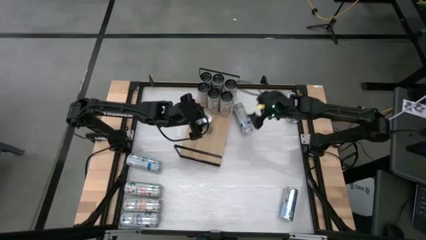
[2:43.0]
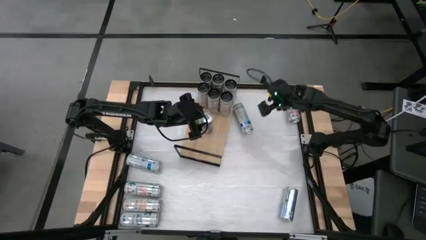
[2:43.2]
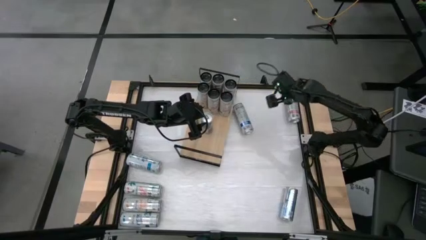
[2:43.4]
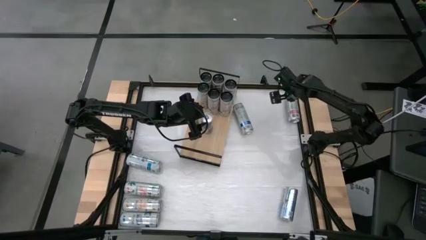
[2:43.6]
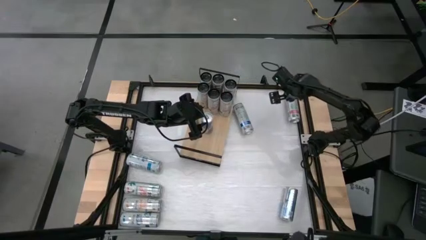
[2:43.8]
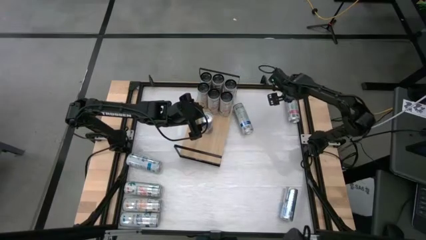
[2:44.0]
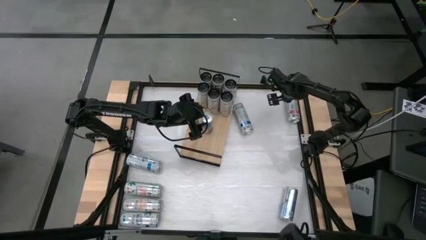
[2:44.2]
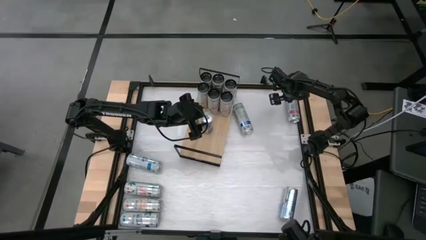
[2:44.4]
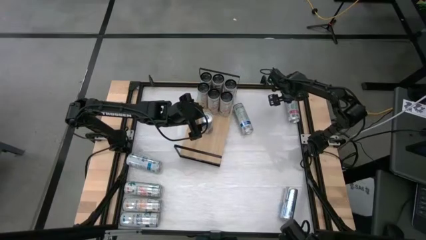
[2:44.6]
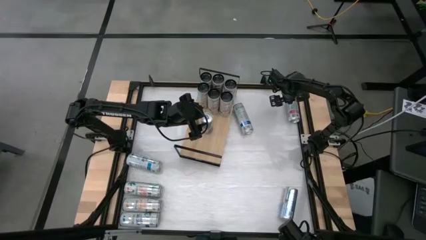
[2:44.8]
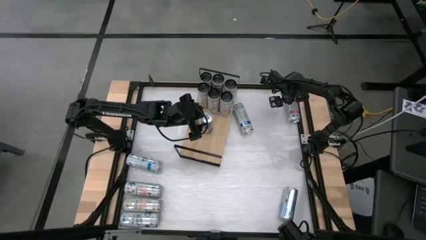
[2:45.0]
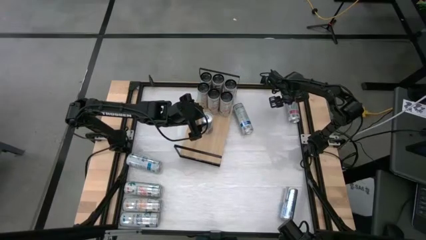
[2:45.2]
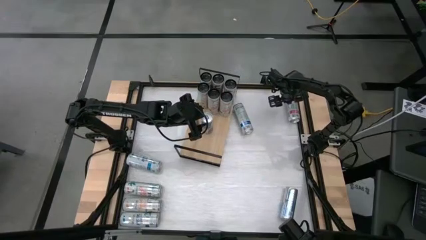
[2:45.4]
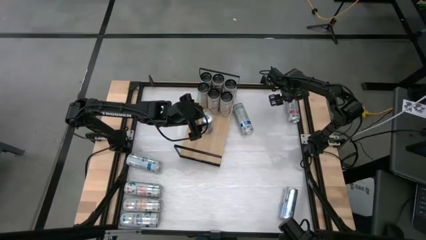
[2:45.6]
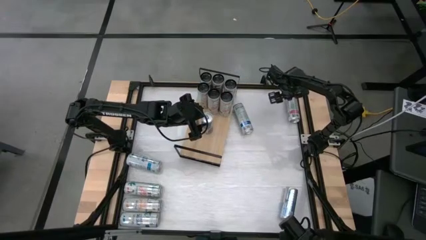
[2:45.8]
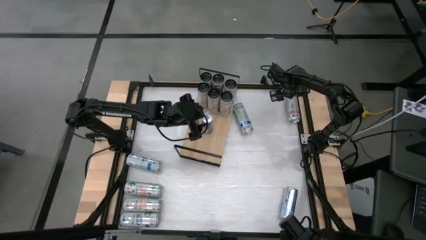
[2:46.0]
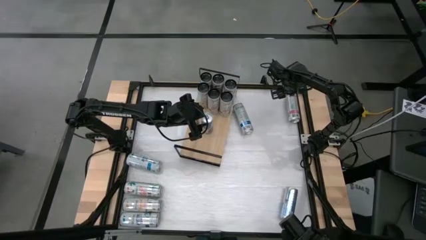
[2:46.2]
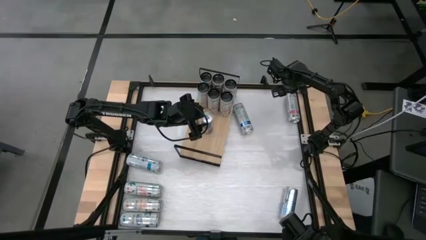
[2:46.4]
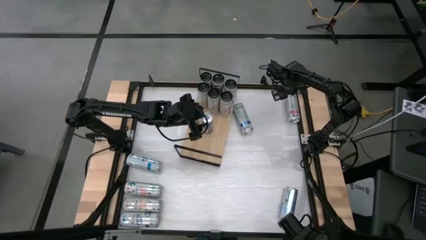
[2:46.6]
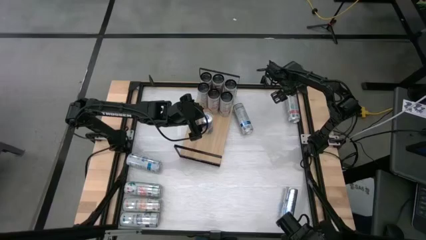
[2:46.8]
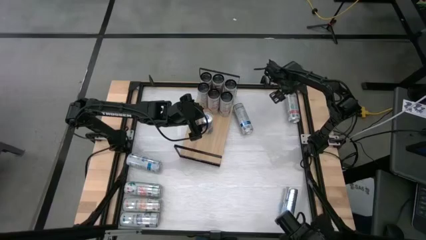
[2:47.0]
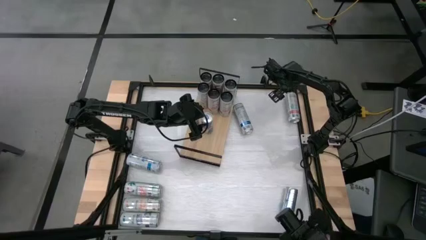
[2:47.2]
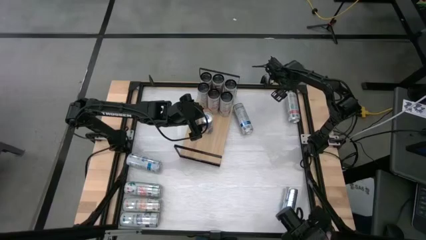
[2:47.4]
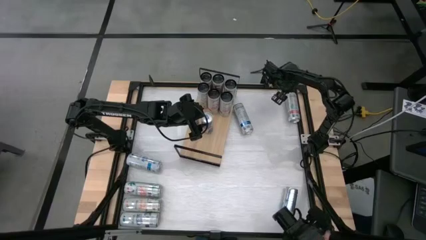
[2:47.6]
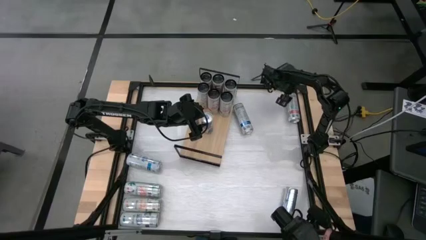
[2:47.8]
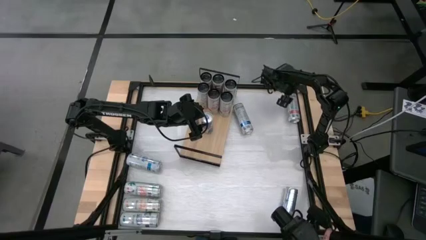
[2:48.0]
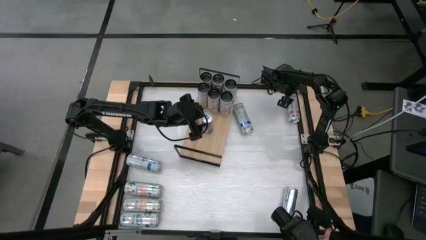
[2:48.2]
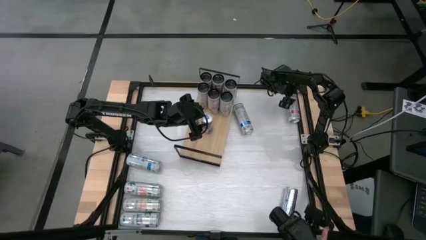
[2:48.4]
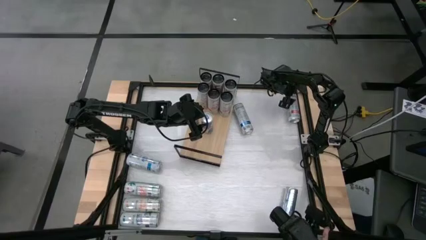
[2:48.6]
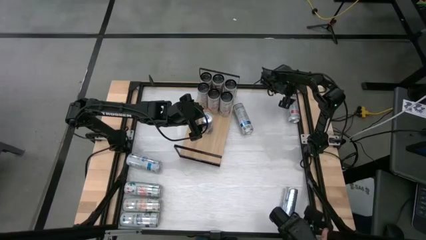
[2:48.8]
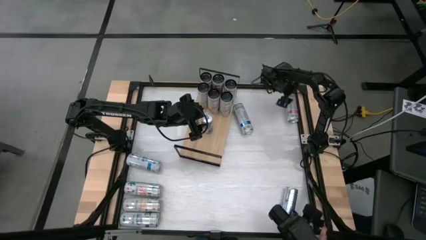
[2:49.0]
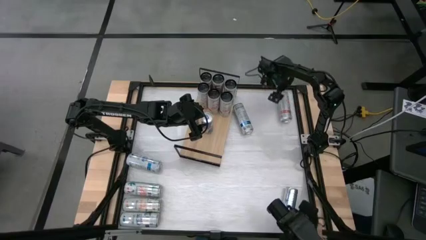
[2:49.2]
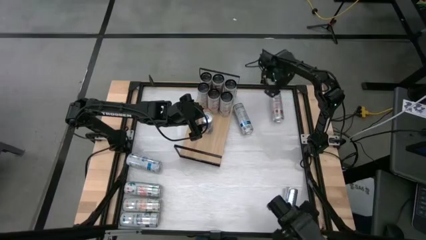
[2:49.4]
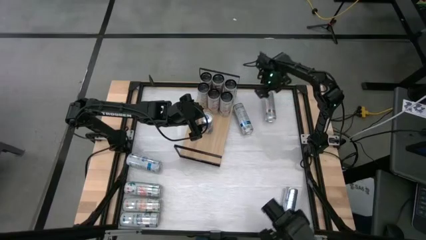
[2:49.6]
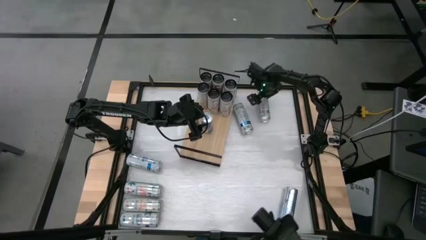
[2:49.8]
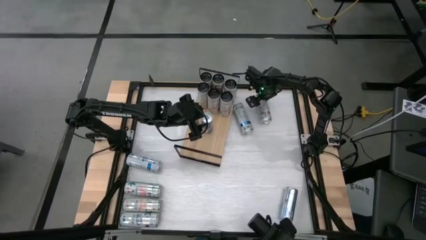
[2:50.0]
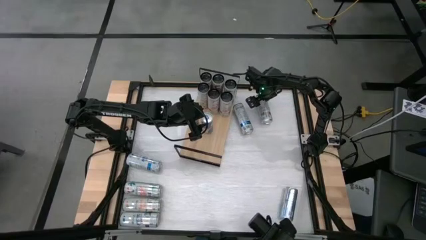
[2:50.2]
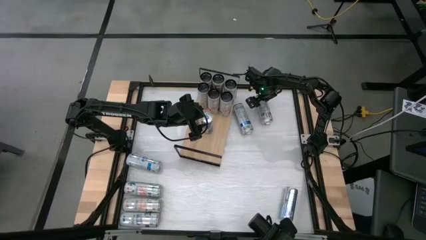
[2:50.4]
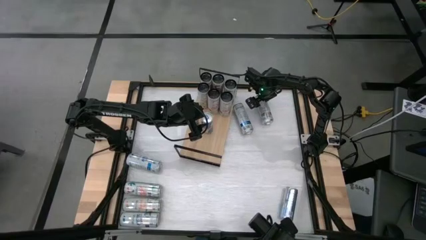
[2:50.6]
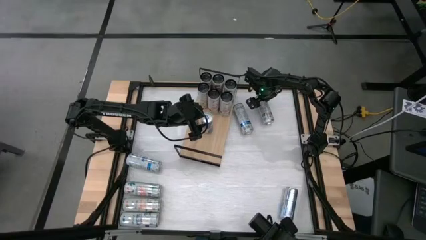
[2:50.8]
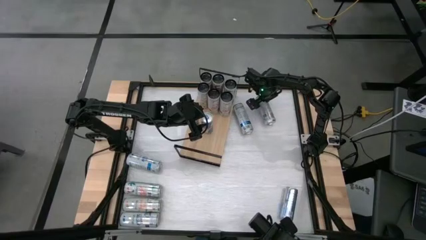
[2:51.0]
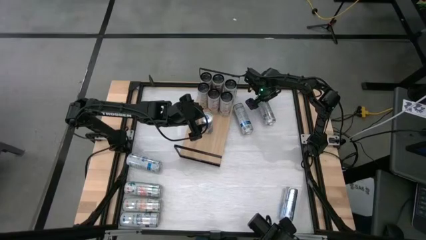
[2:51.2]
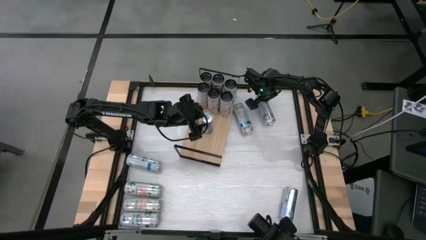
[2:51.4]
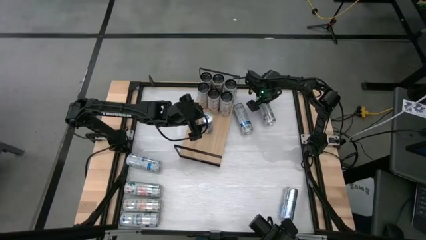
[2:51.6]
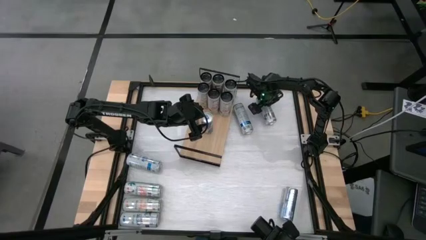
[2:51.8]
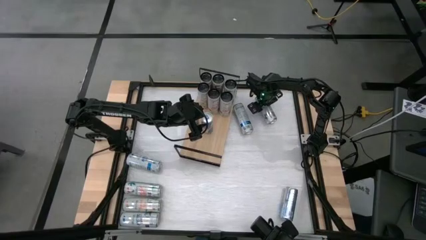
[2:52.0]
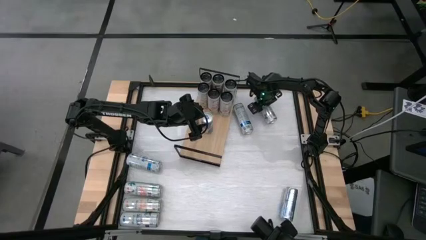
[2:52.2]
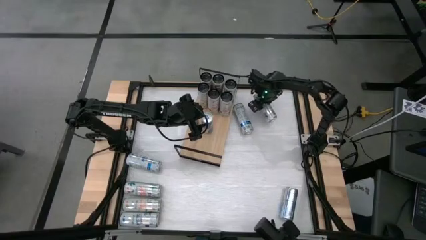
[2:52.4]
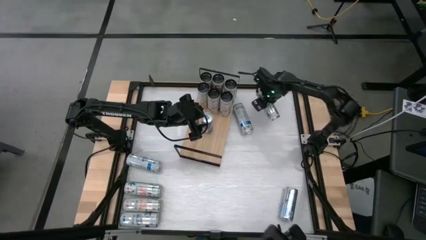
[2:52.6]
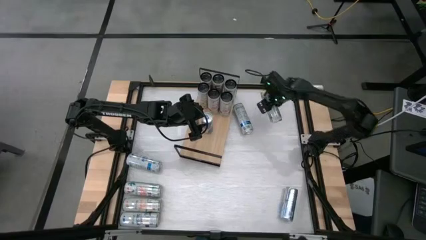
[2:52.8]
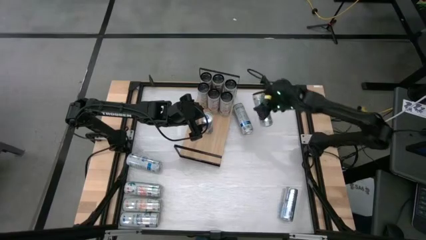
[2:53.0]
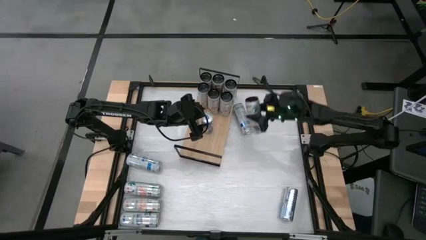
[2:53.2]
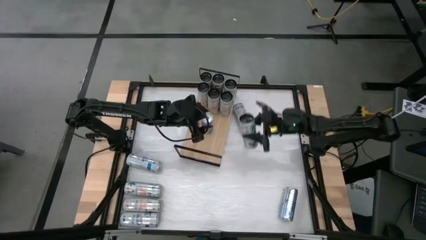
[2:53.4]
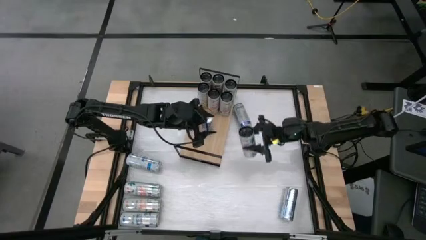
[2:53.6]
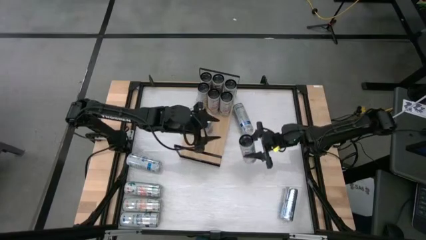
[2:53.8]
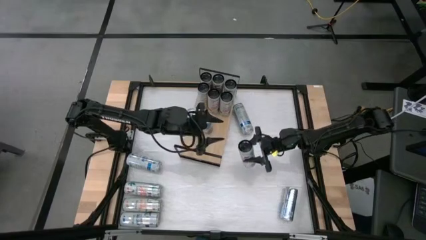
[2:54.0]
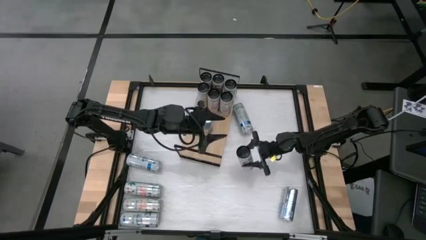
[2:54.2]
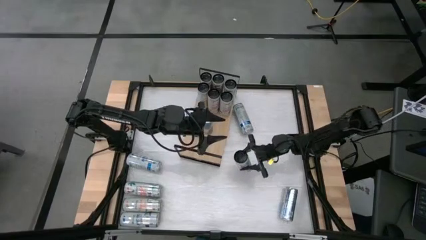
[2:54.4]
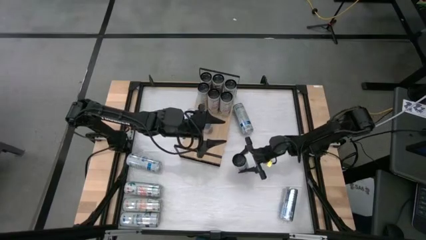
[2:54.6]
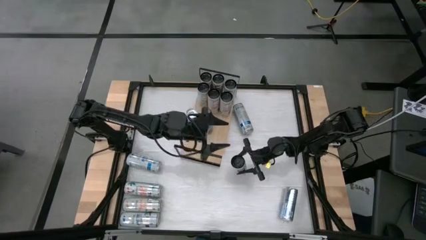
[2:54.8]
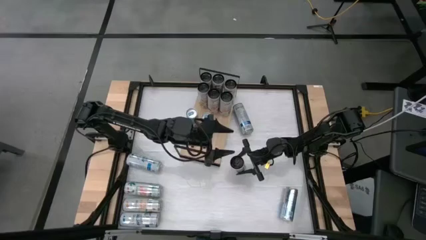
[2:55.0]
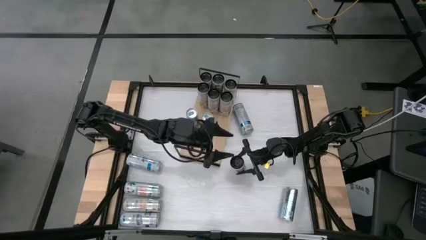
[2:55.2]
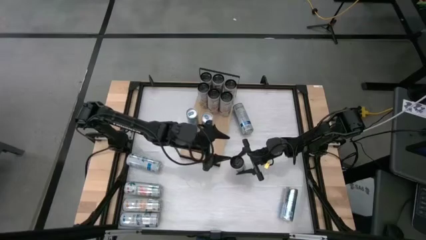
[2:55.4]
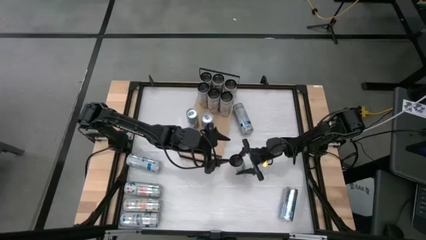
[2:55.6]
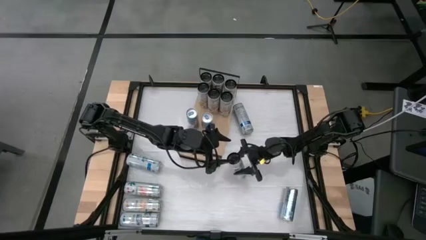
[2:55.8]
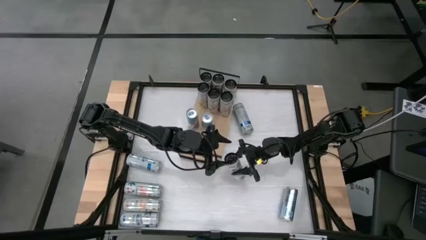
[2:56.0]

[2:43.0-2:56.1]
Task: Place canned beverage on shelf
Put the top right pink soda can on the shelf aligned with the other pink soda can

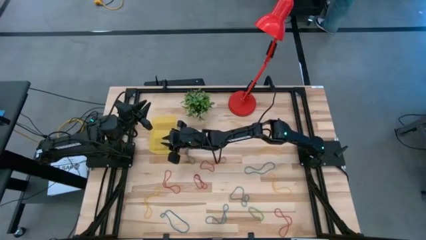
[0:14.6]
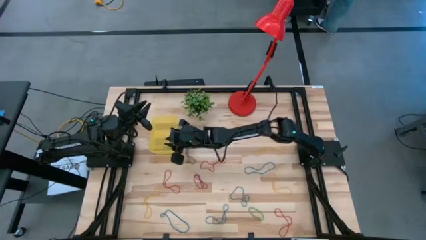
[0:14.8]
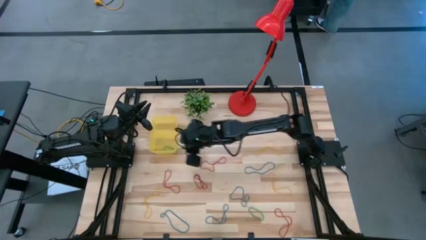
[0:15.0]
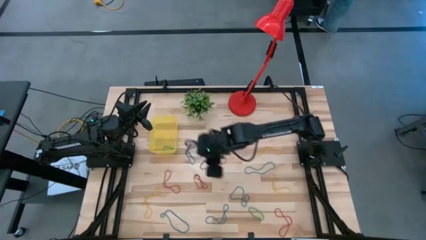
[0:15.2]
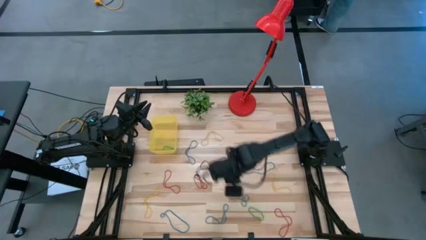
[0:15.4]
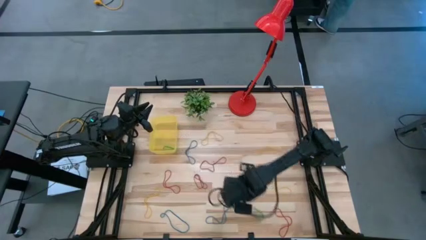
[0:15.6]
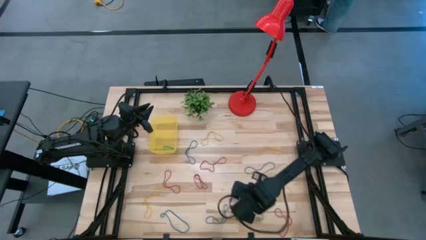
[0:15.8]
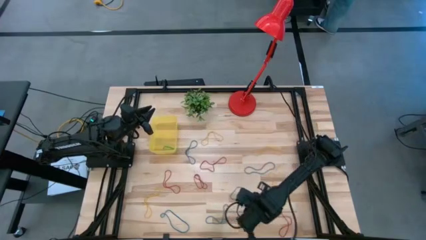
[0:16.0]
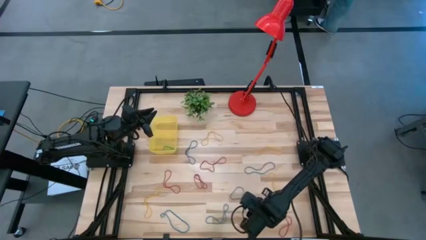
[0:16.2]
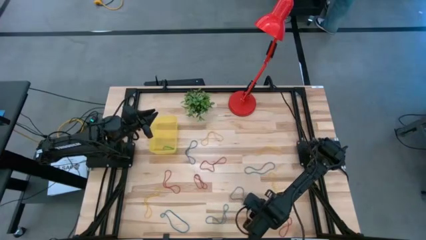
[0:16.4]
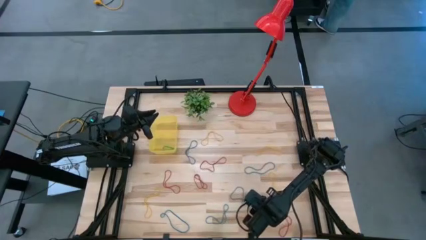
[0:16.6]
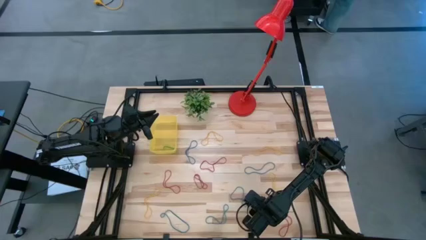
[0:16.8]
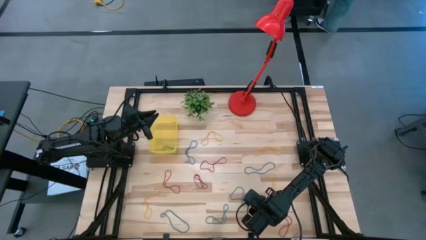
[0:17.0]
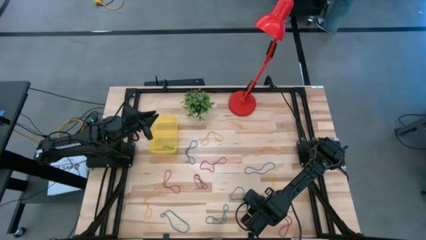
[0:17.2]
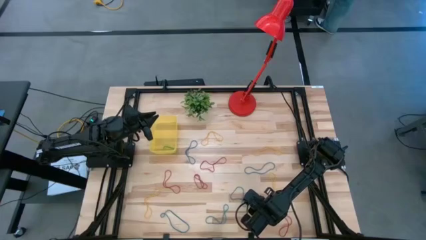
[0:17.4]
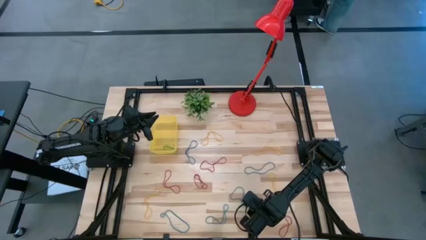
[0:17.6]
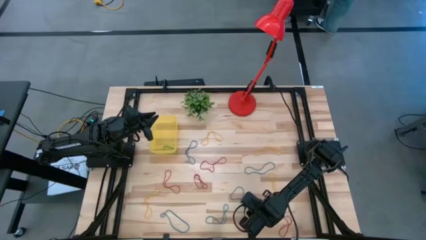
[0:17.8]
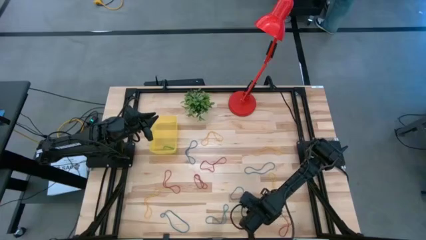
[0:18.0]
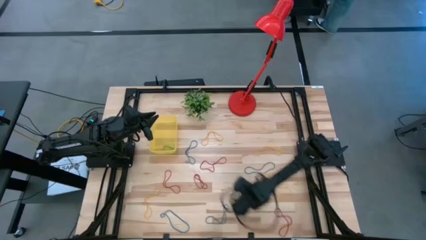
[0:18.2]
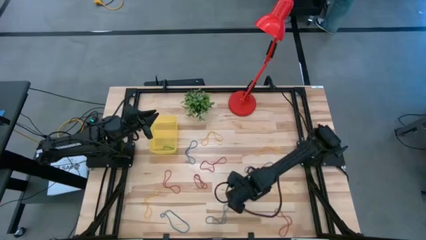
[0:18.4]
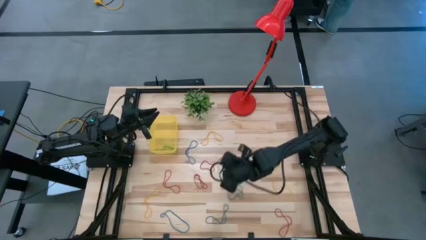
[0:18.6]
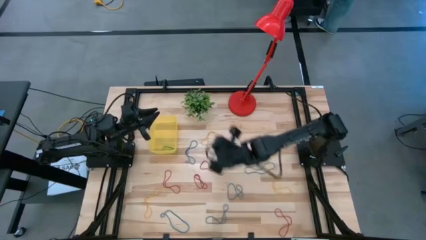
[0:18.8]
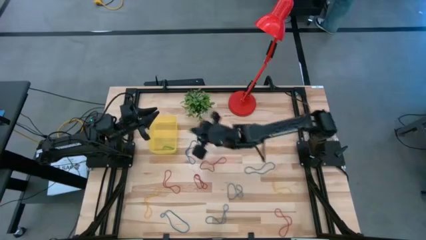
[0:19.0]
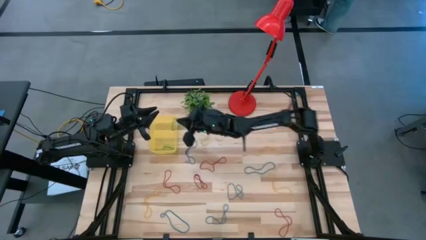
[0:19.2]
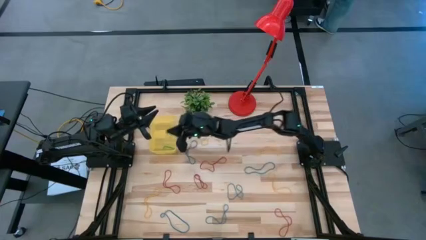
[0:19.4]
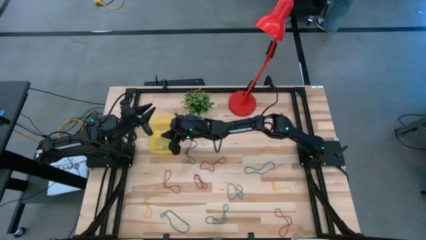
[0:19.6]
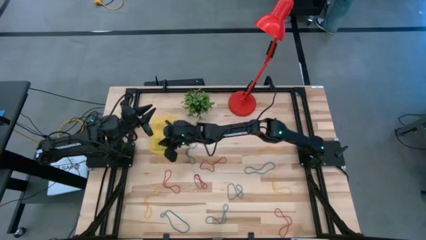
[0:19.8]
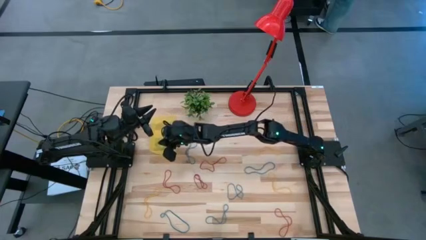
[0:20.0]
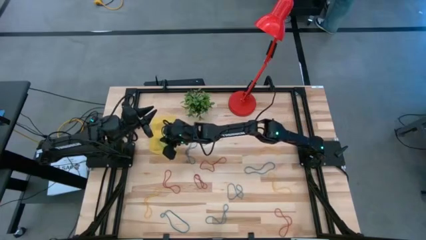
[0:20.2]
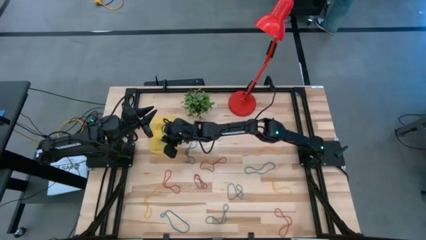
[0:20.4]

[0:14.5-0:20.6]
Task: Pick and place items into bin
Put the green rubber band into the yellow bin
